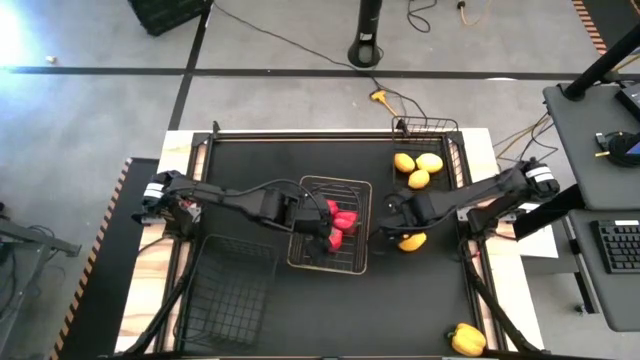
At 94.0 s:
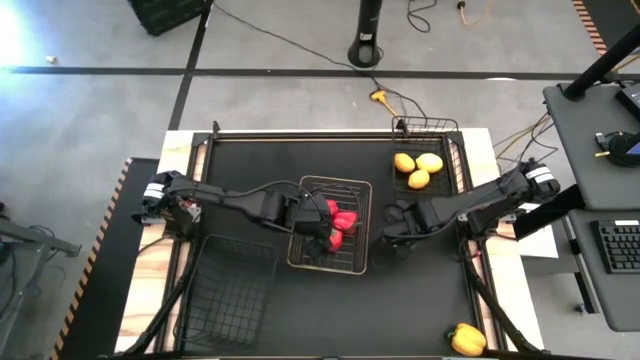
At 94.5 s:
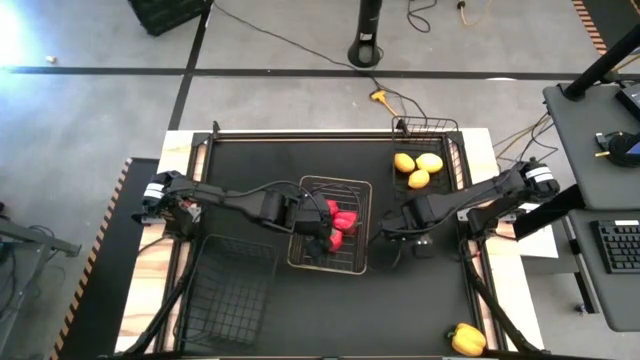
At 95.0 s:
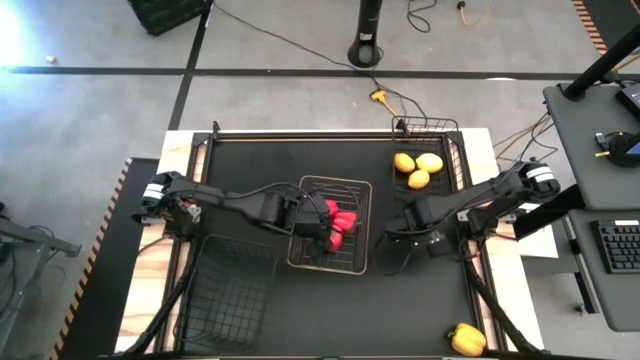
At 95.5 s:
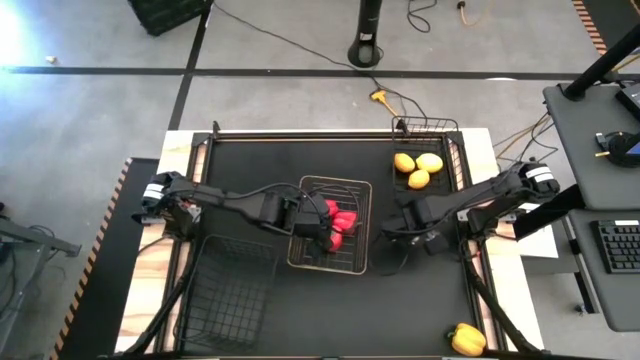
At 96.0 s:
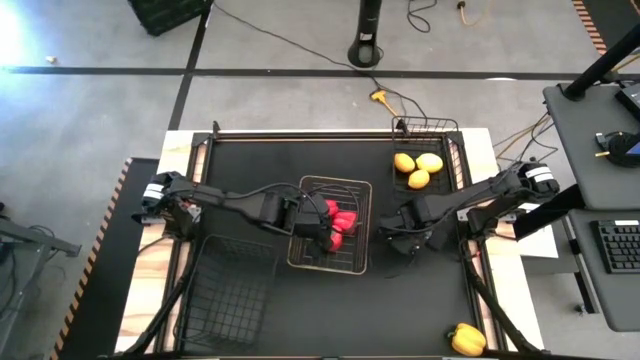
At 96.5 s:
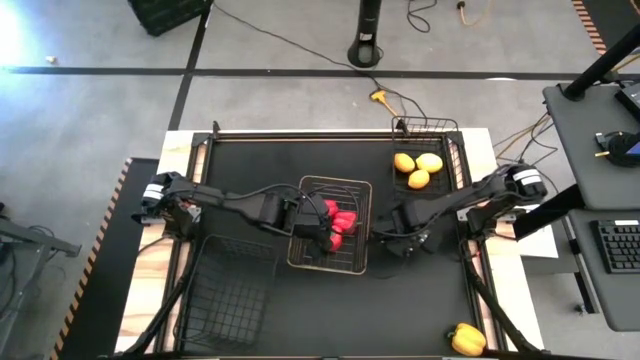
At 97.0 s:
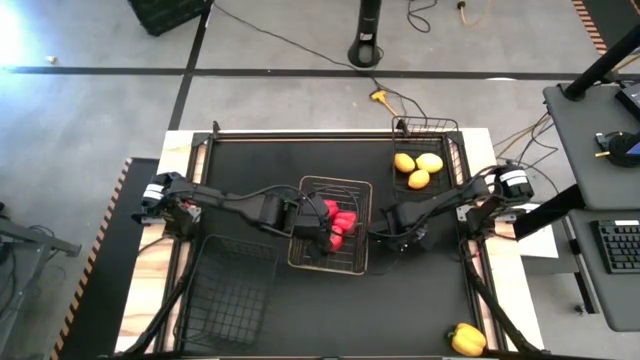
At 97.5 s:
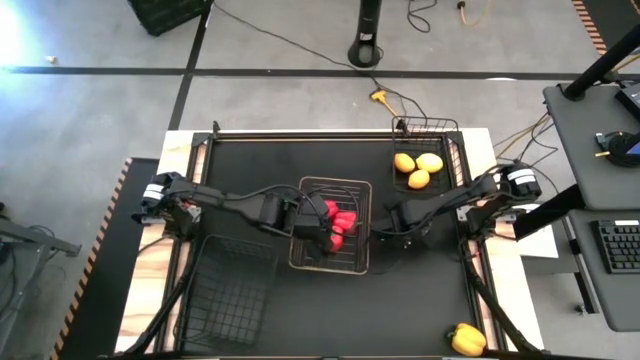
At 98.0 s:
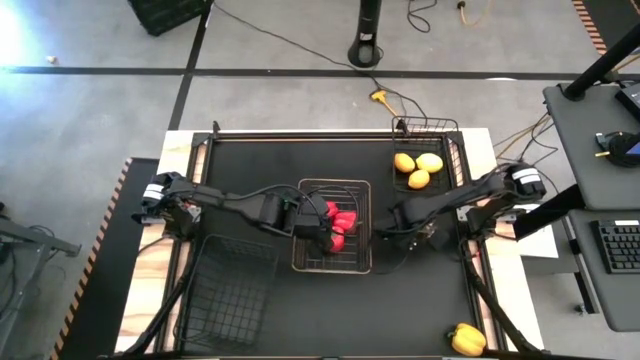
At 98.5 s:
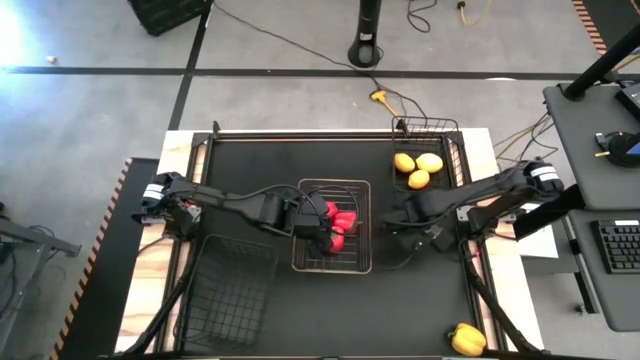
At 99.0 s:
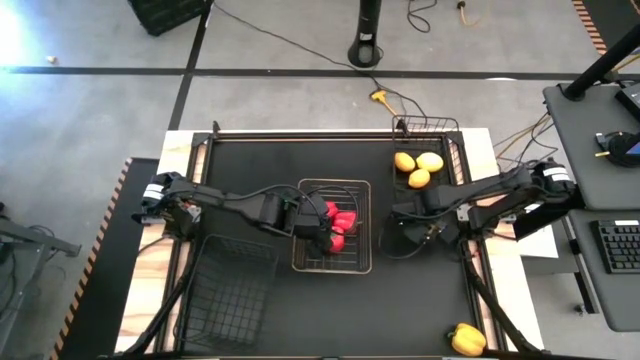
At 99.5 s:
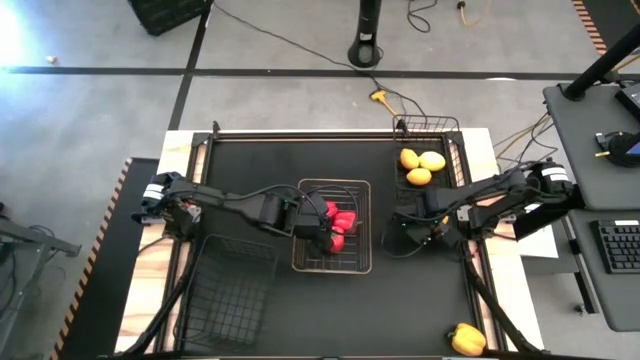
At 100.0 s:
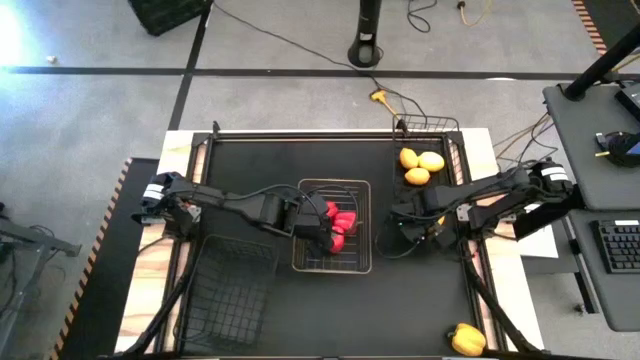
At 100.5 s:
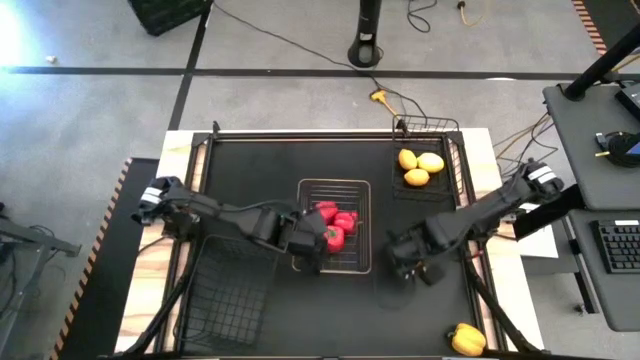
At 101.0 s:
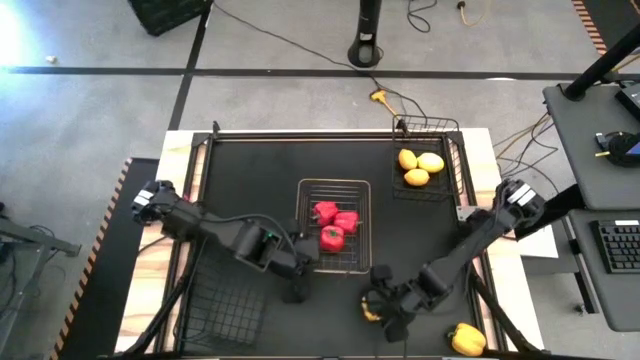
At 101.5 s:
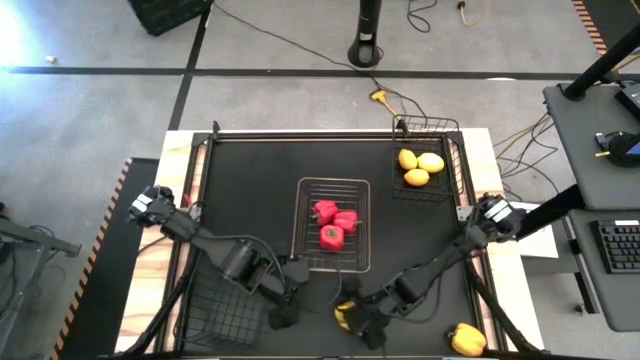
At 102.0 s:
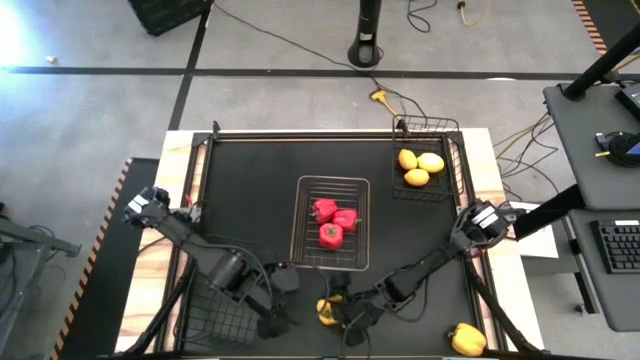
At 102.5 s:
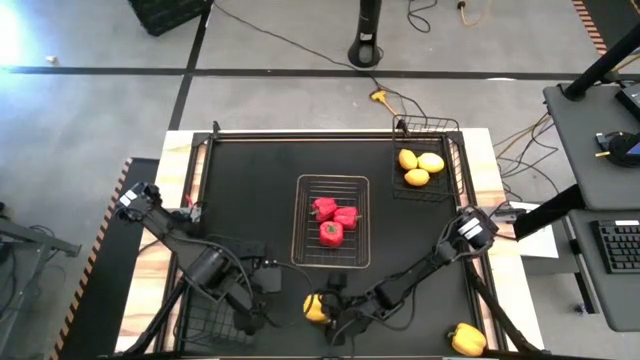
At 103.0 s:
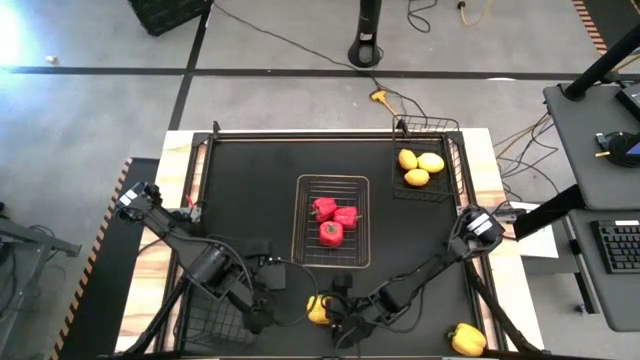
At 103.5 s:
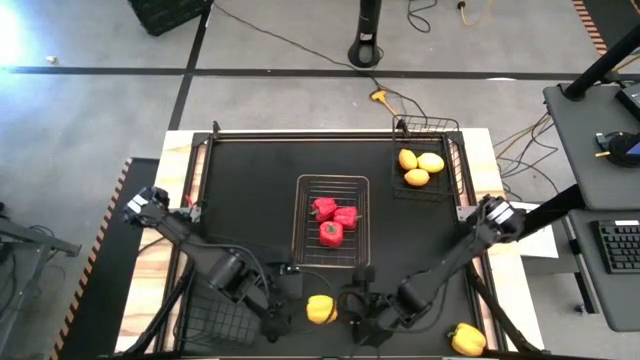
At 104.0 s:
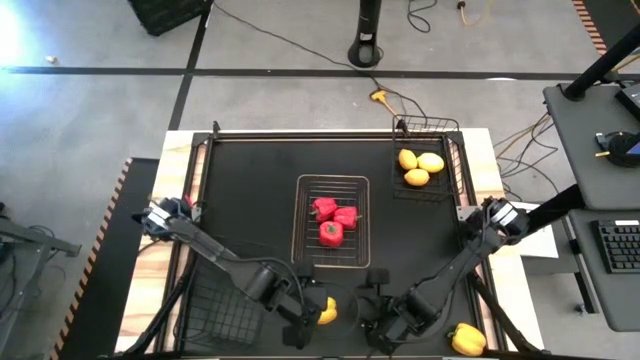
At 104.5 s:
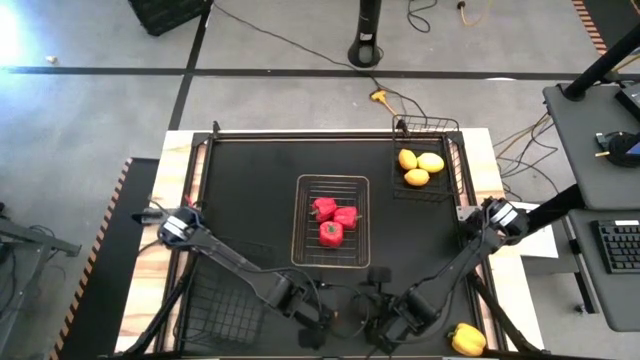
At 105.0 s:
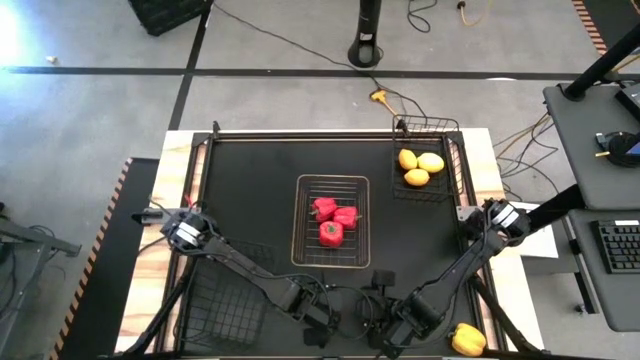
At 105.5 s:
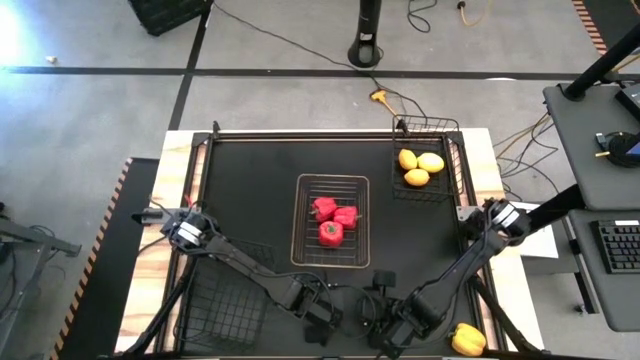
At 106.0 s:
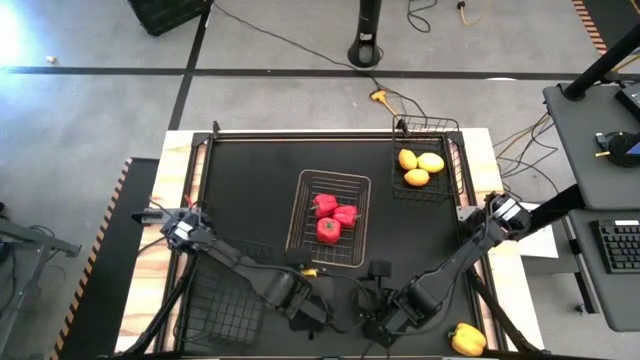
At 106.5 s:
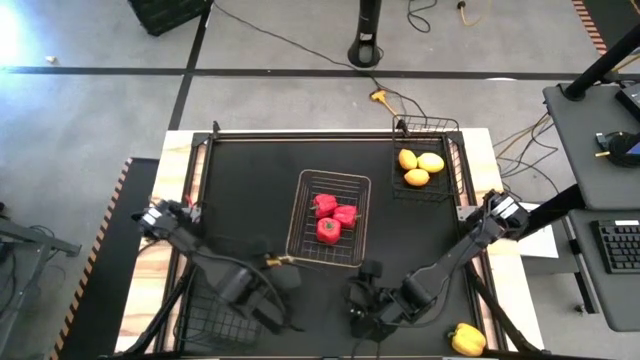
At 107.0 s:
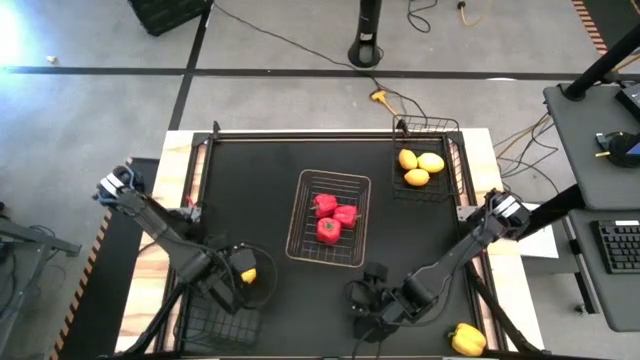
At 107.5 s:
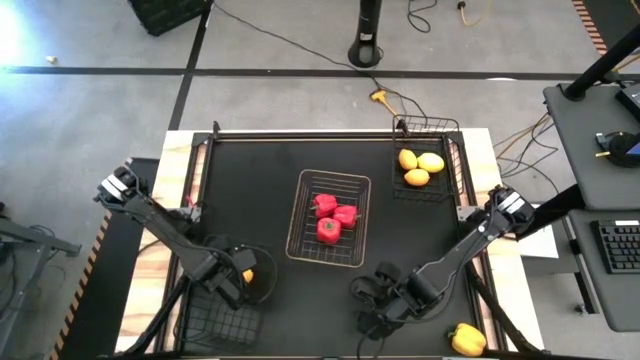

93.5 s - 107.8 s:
Task: Sort produce into baskets
Put the top yellow bell pepper into the bottom black wire basket

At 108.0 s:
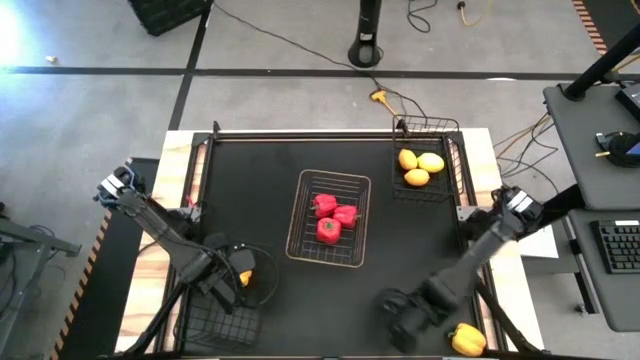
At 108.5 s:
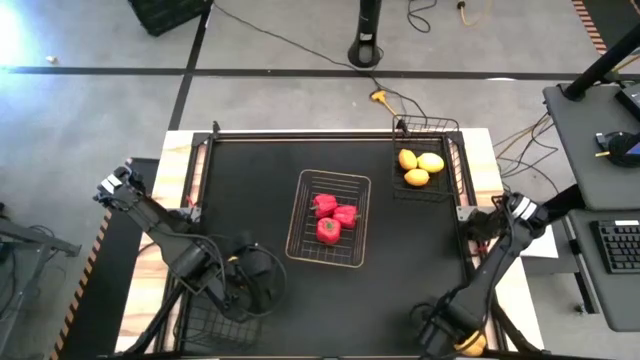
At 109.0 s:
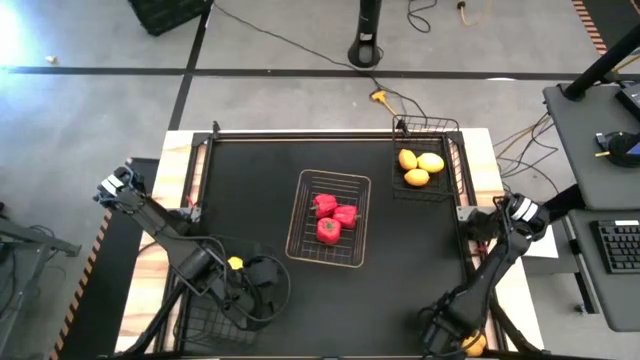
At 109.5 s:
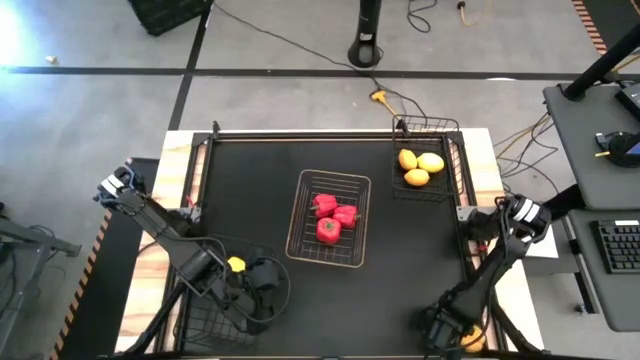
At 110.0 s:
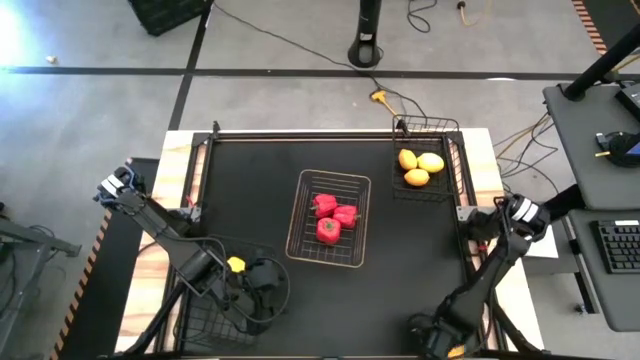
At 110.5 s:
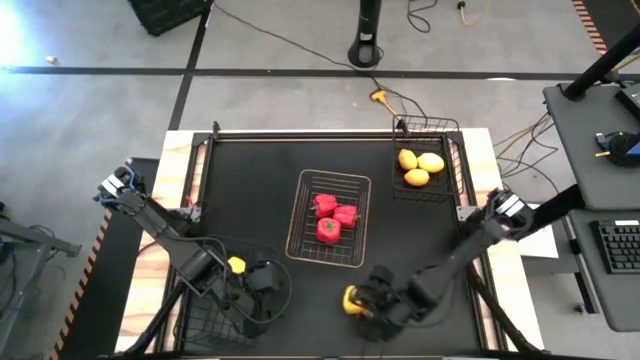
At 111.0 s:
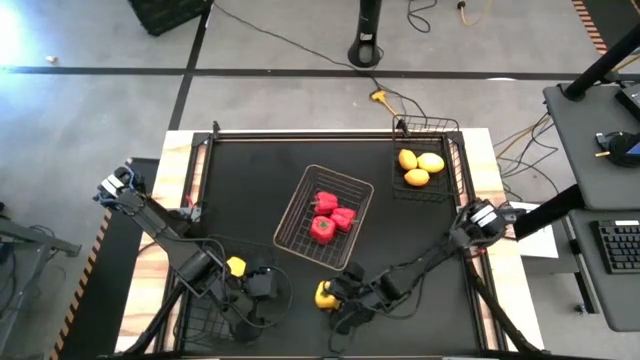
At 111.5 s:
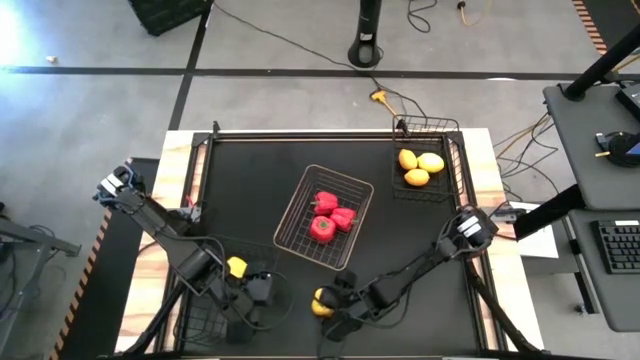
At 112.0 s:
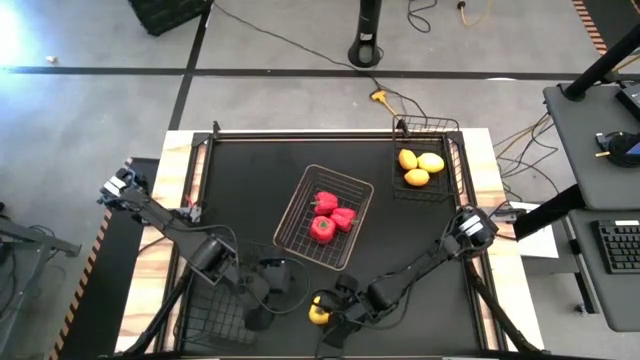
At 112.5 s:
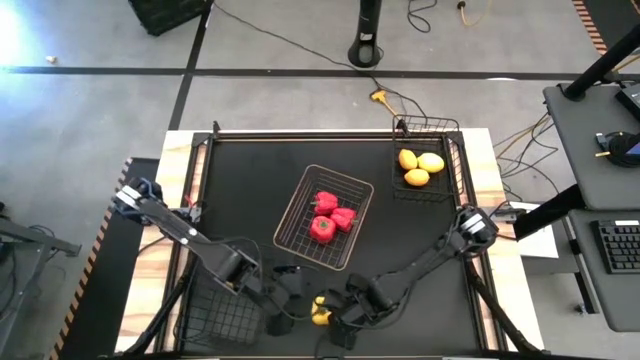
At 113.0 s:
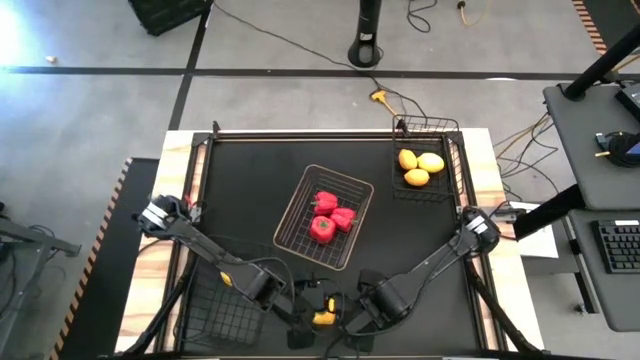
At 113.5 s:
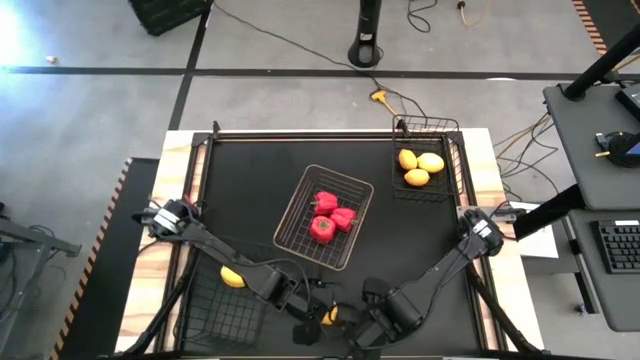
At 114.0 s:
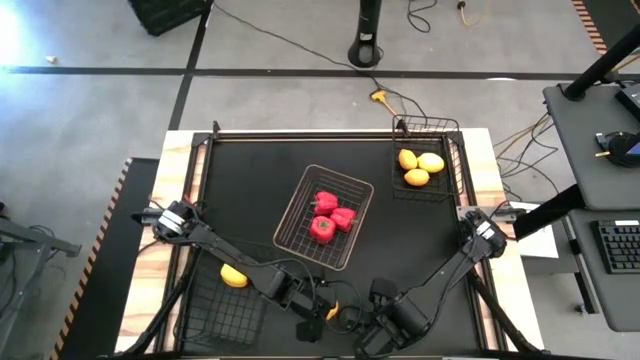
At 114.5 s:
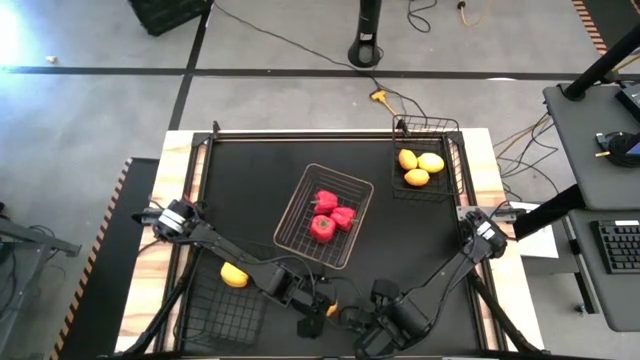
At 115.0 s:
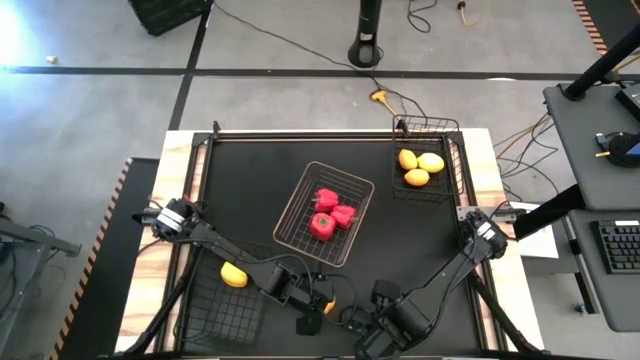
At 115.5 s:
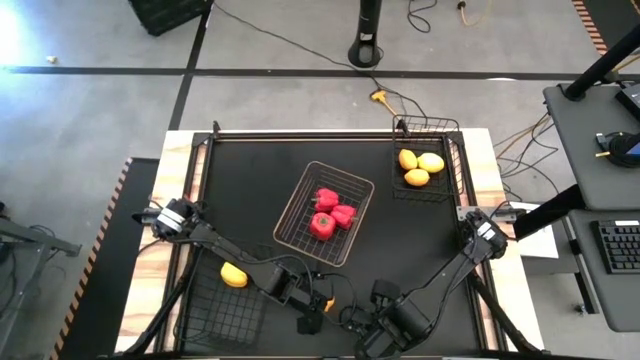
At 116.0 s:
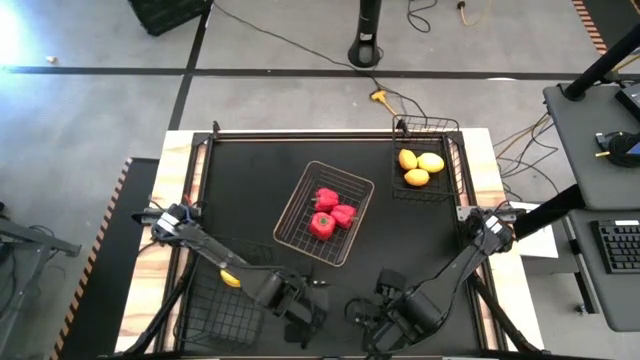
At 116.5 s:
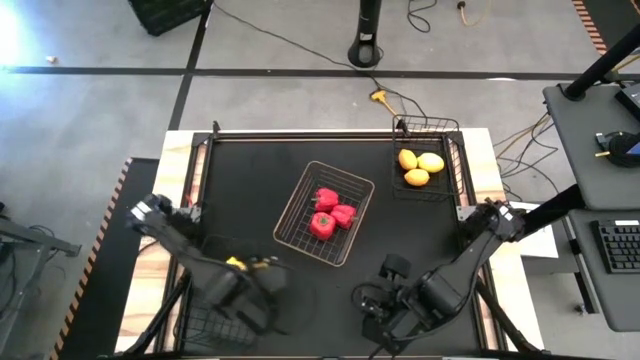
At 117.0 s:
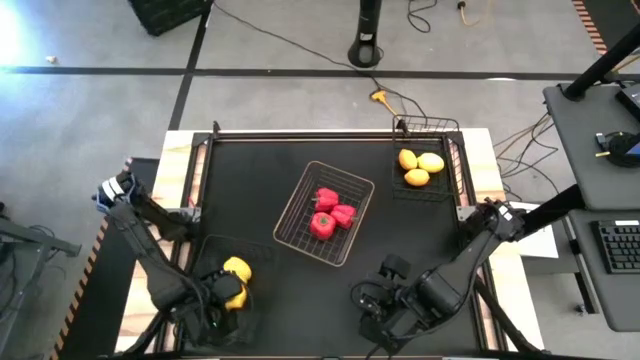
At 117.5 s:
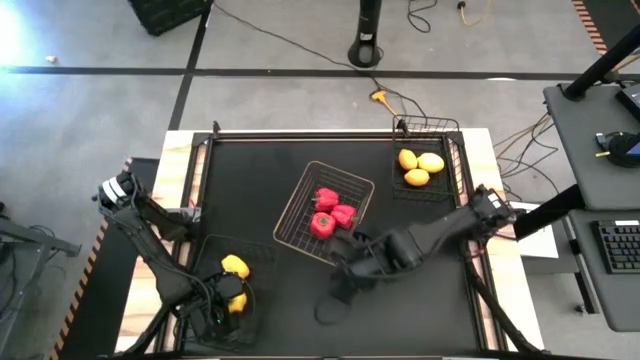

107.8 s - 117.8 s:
Put the yellow bell pepper into the bottom black wire basket
